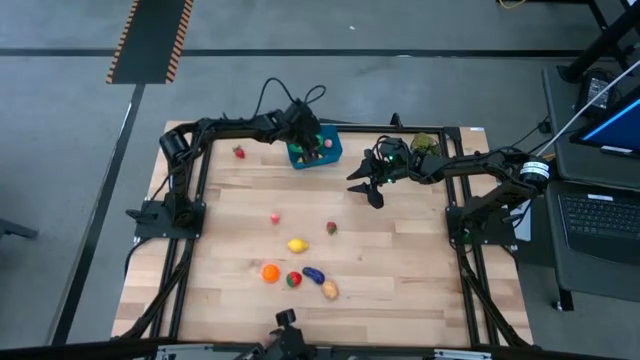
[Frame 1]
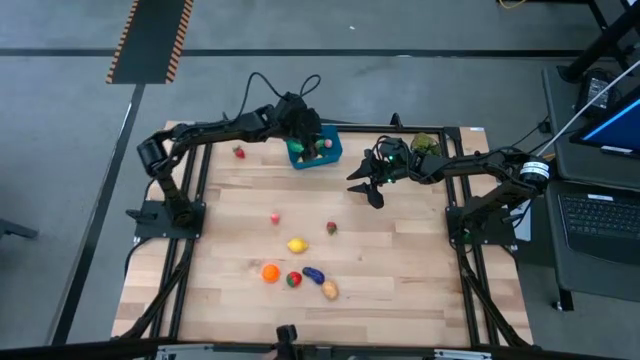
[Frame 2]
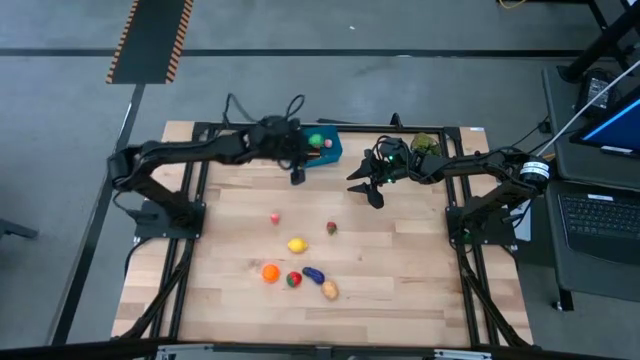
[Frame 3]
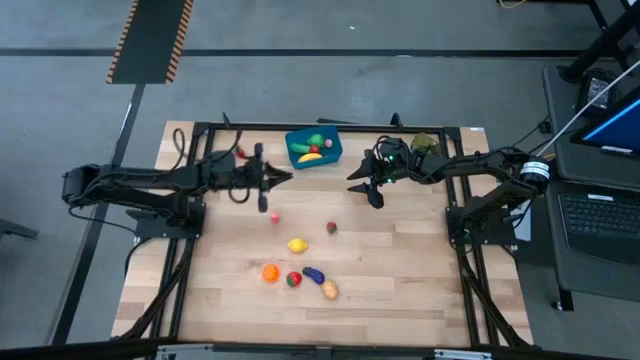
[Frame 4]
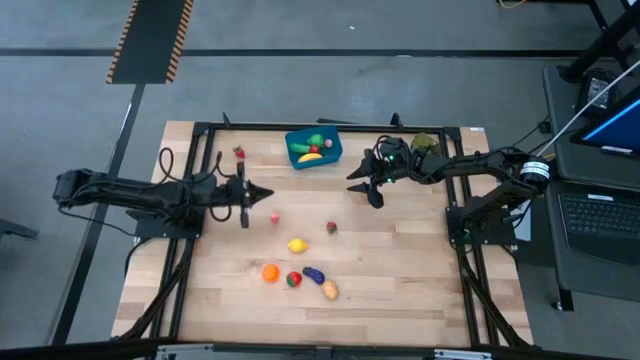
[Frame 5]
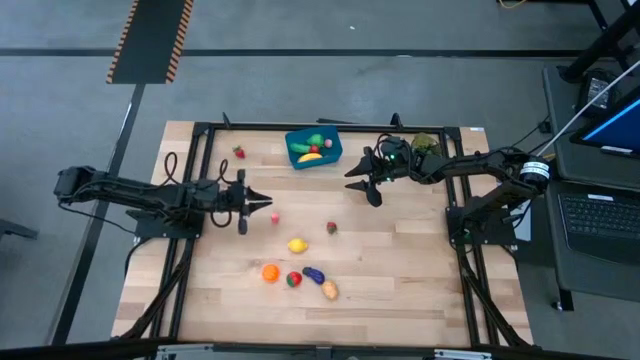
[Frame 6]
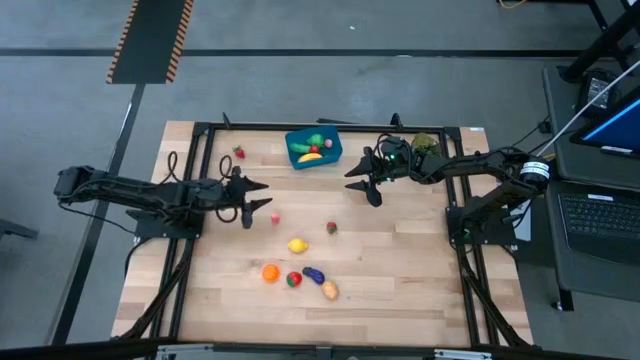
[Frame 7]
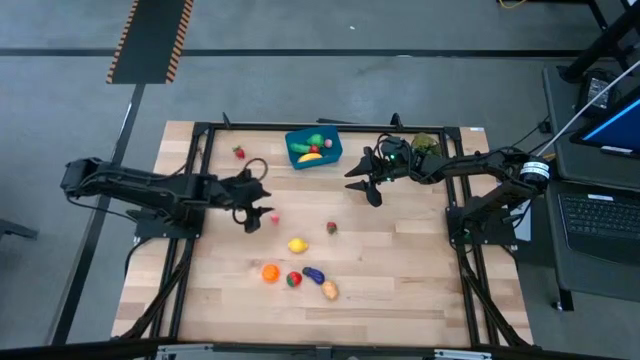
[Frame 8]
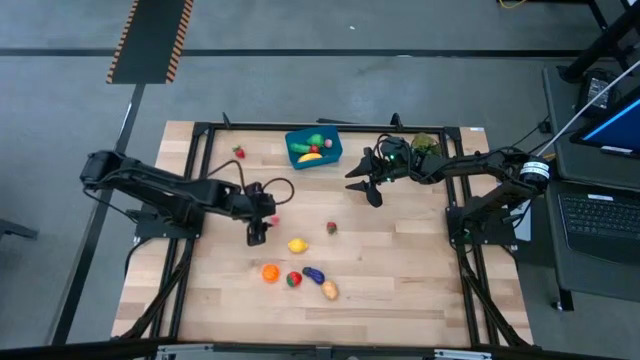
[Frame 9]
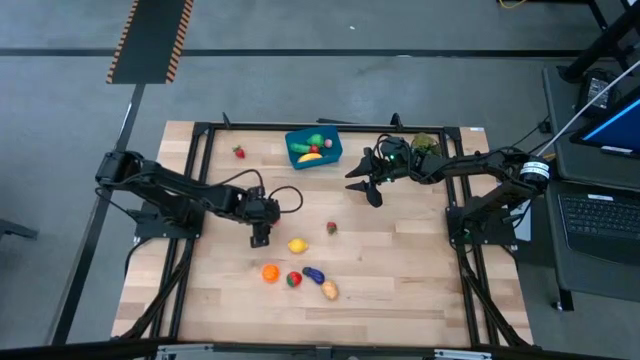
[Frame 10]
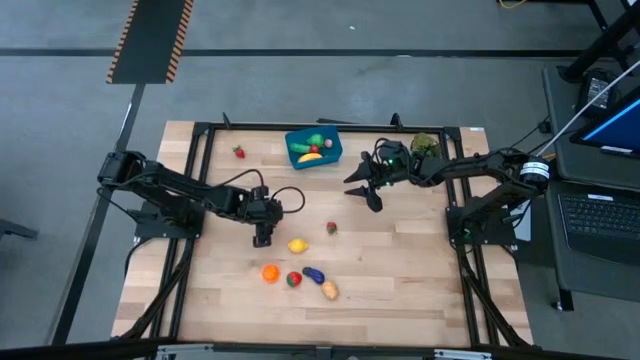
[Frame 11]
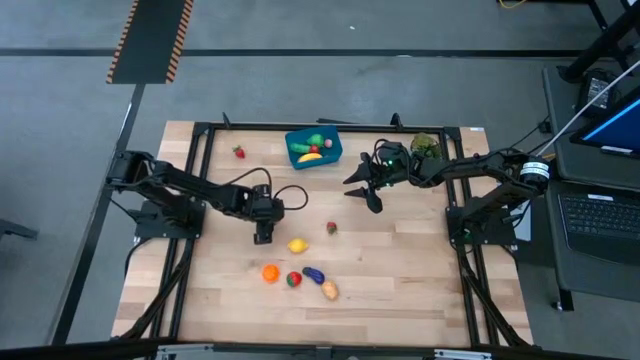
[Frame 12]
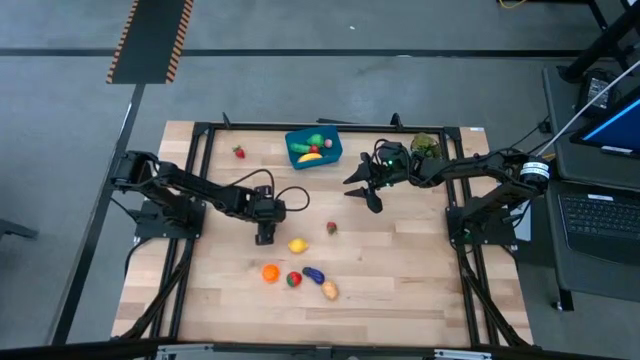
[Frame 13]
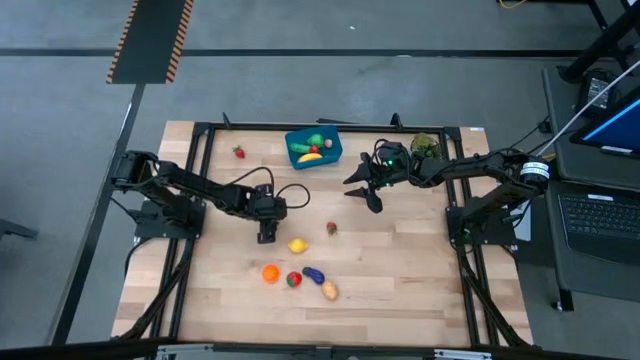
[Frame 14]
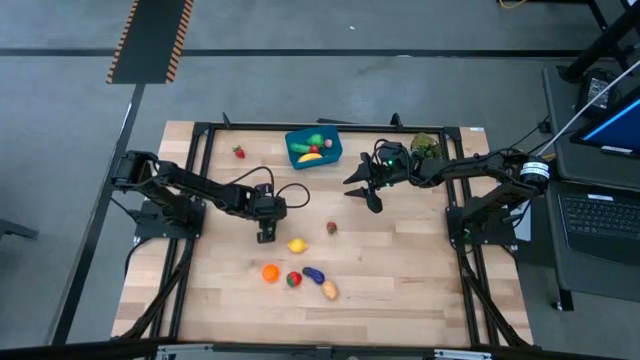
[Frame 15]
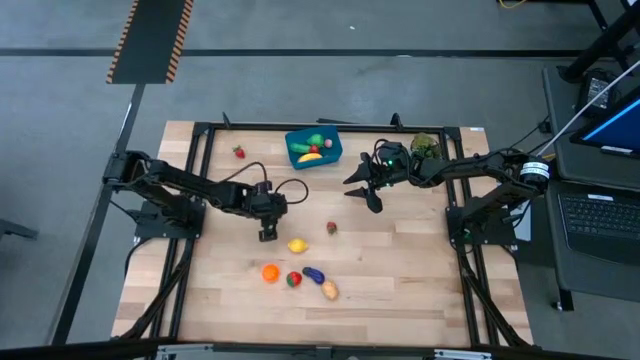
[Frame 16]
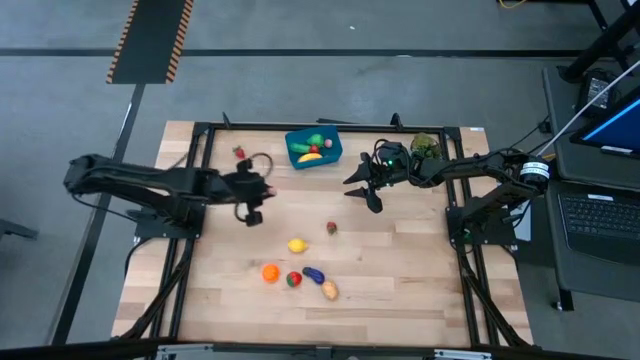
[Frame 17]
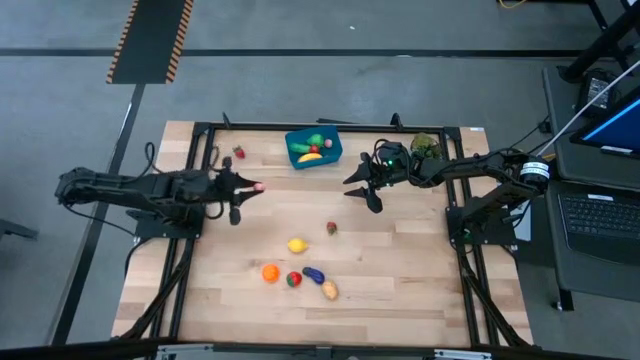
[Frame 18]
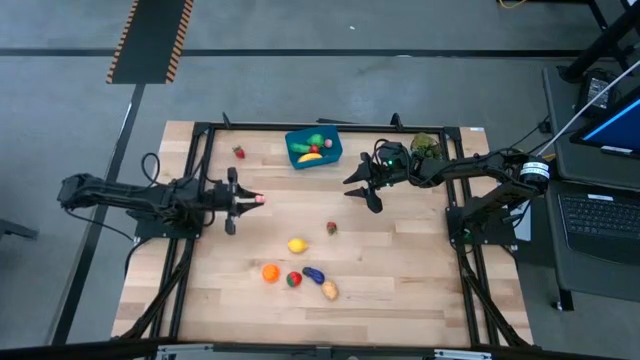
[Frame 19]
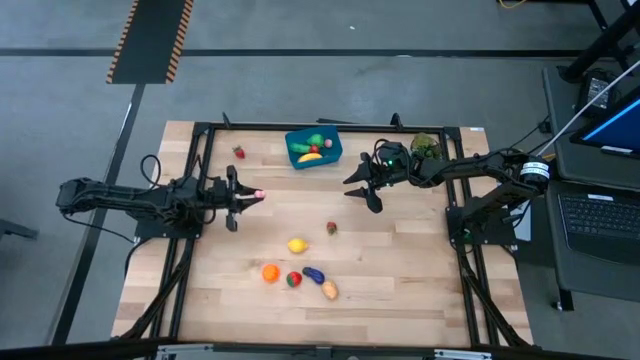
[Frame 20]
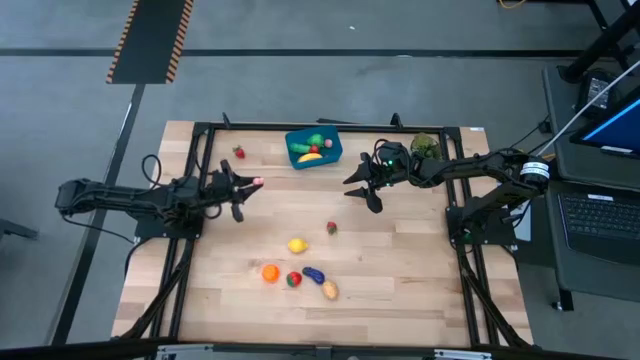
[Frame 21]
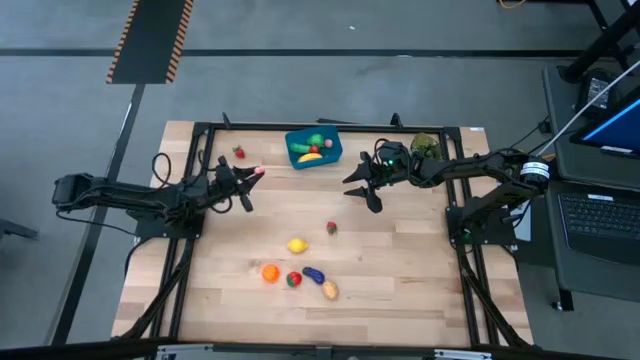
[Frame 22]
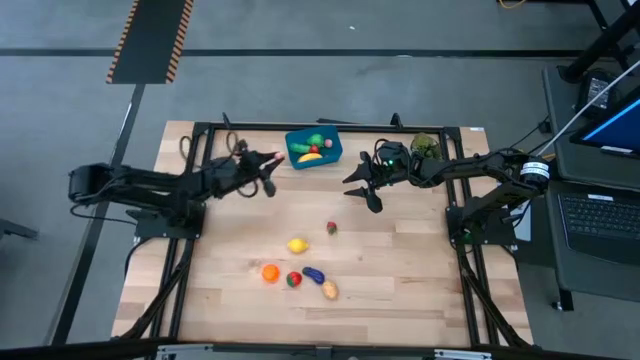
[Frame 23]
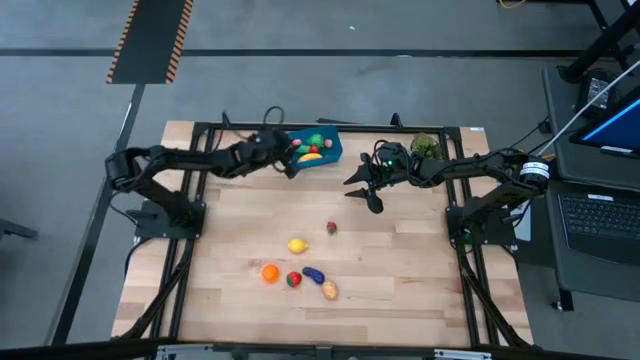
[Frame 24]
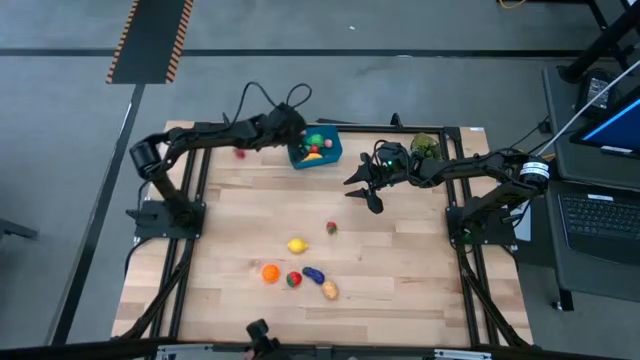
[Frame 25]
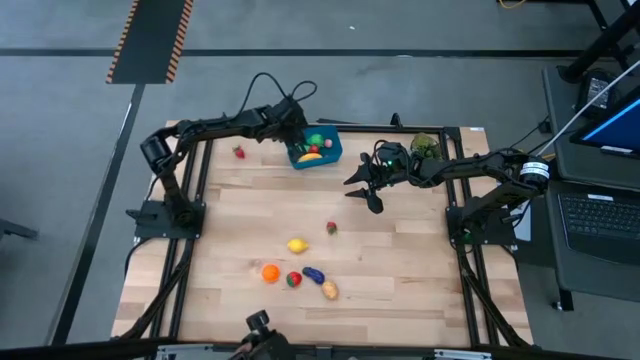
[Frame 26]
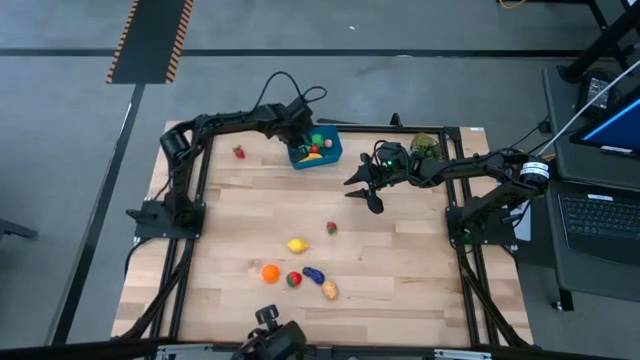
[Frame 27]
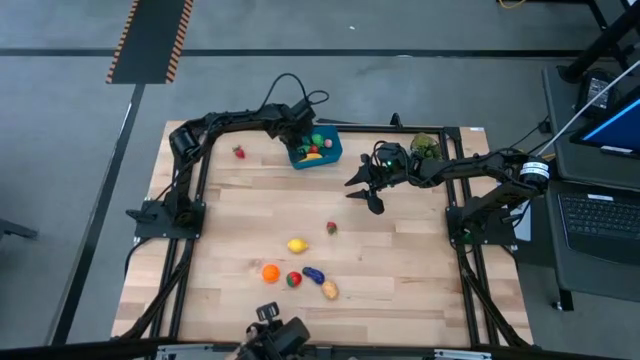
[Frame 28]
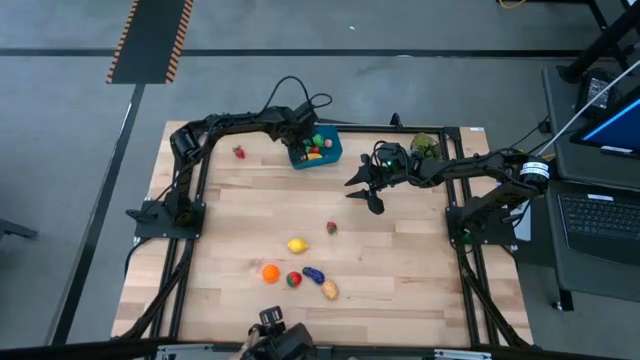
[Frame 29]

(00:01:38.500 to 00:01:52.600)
Task: Pick and placing Produce into tupperware
Put the peach into the blue bin

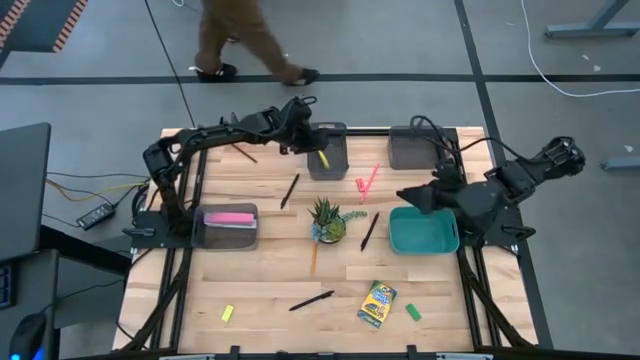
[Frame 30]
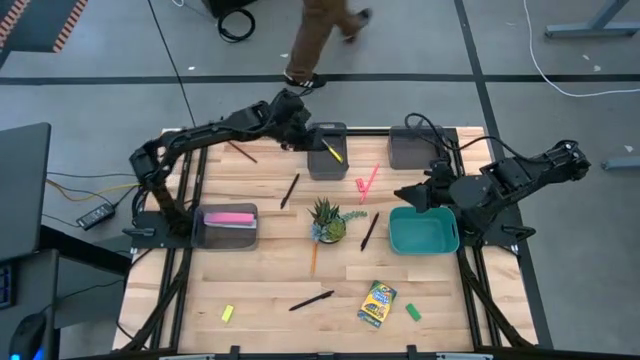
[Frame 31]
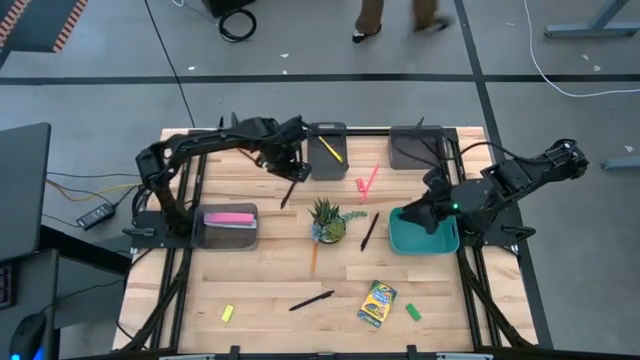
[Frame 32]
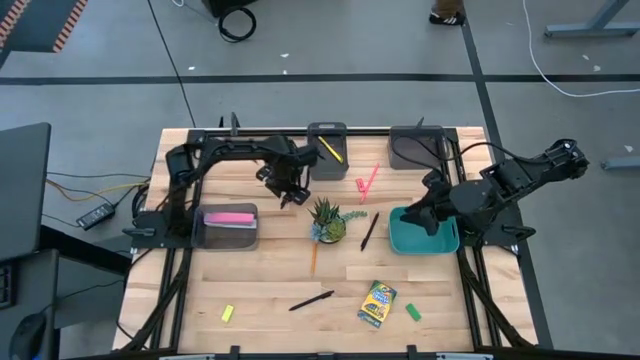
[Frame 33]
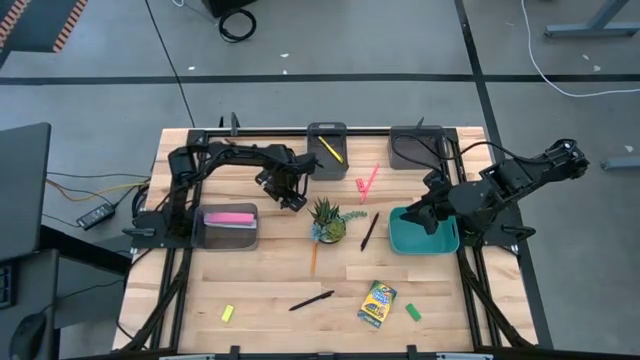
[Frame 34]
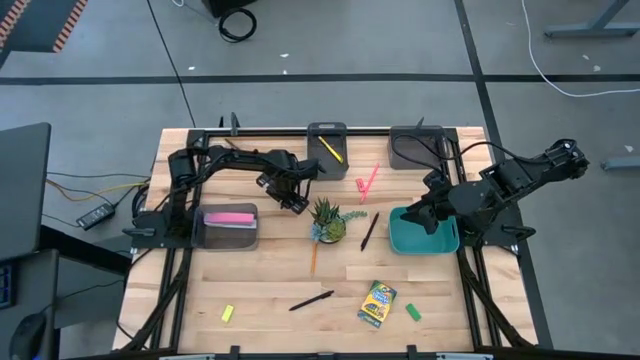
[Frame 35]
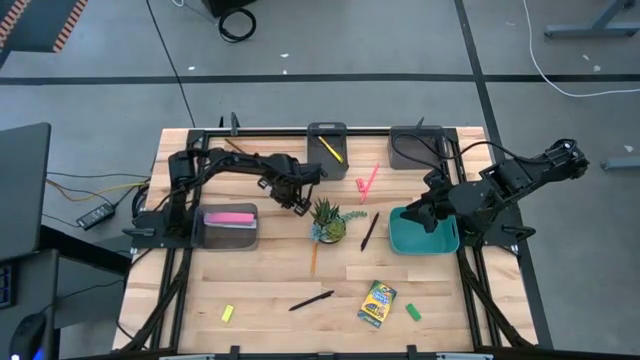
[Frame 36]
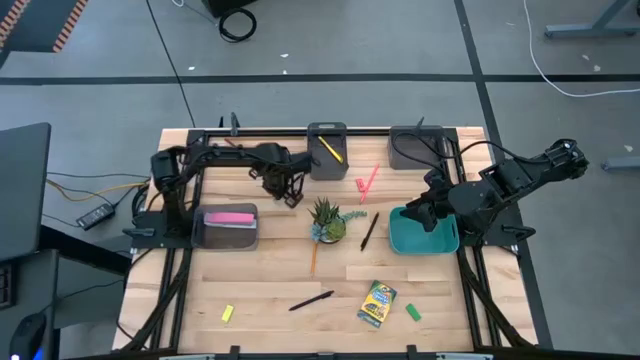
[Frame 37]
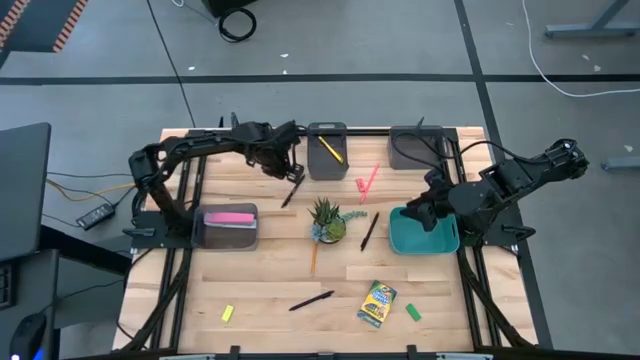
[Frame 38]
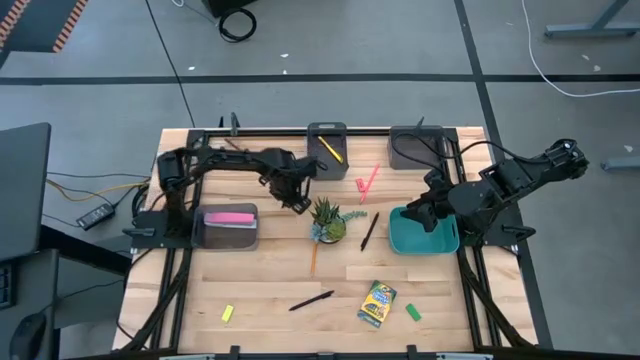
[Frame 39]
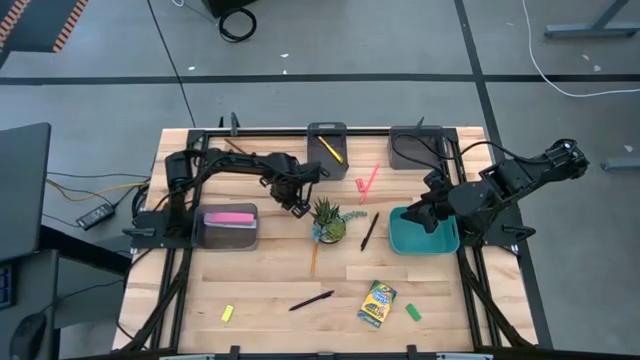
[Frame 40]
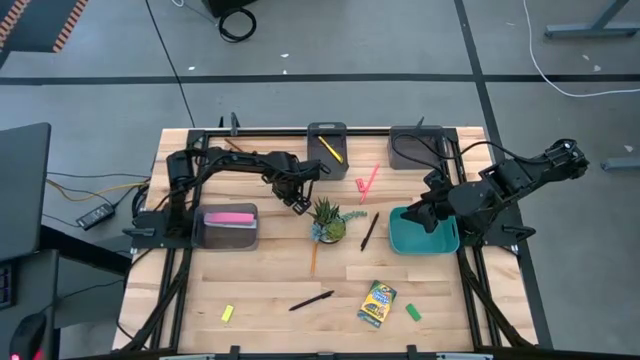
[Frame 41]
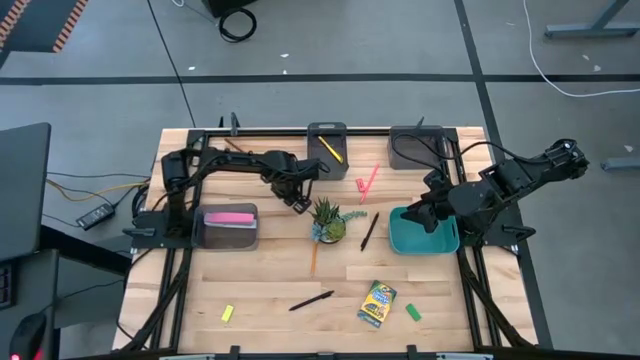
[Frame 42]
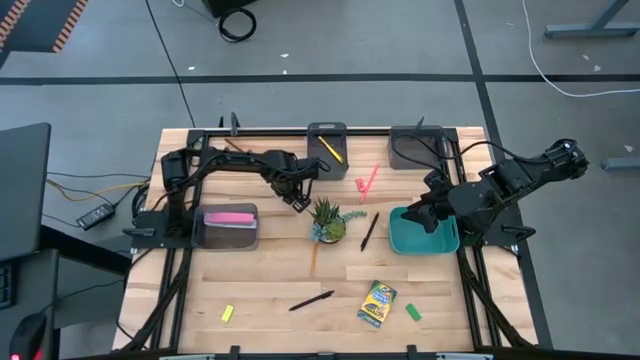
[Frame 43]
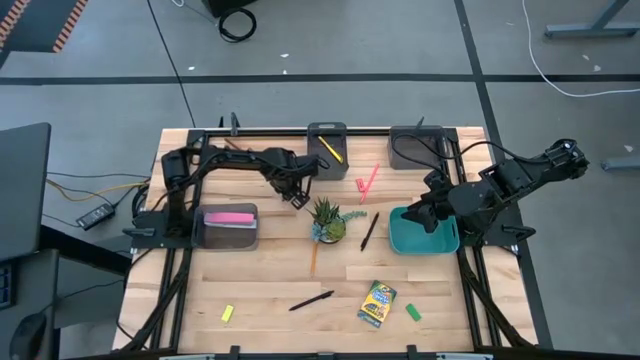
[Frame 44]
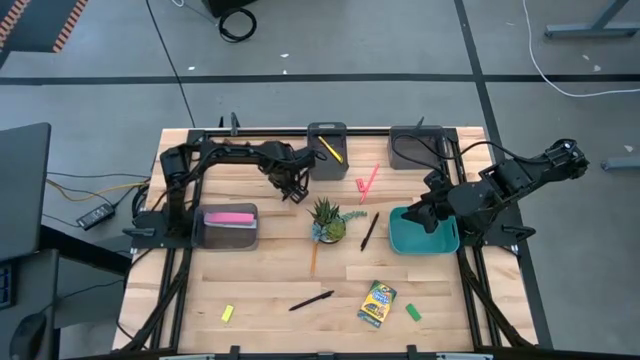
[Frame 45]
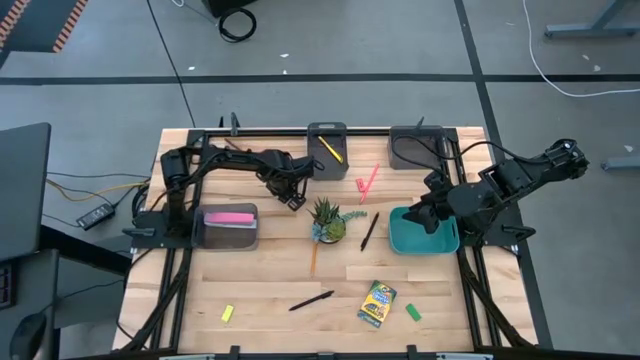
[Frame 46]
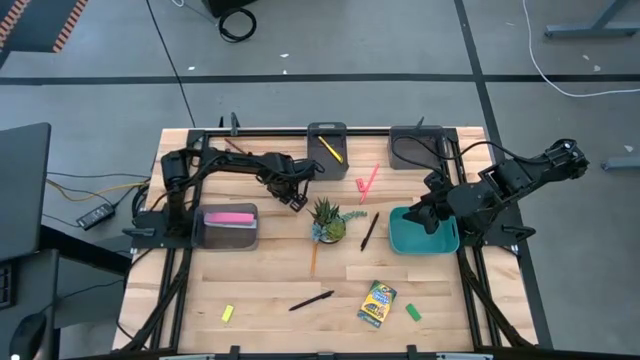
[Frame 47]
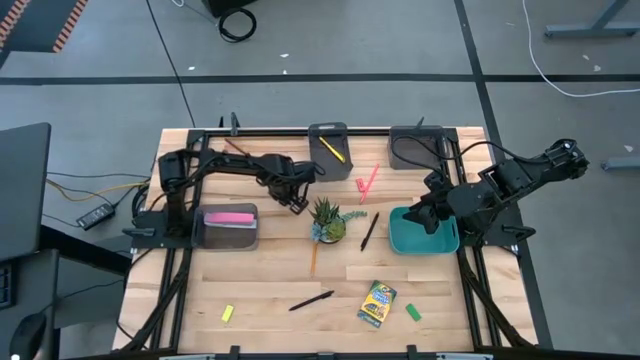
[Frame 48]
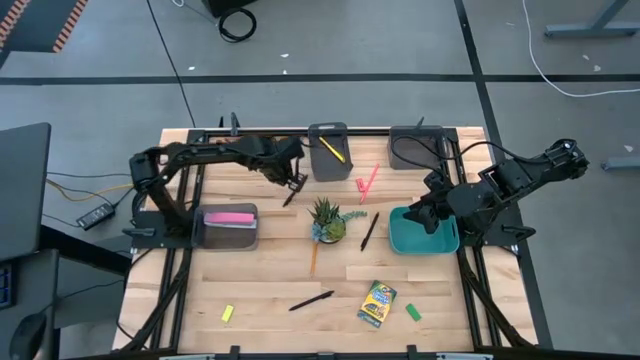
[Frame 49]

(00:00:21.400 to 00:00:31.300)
Task: Sort crayons/erasers/pens/pencils in bins
Put the left black pen into the left black bin
